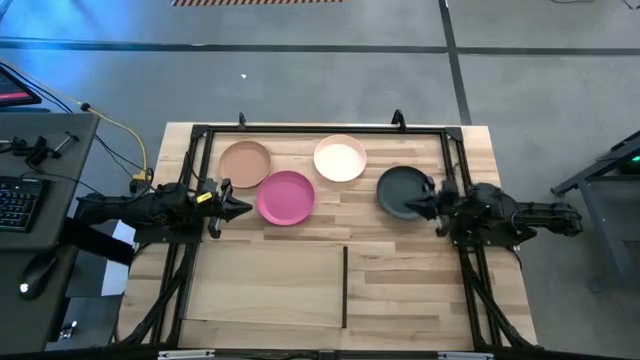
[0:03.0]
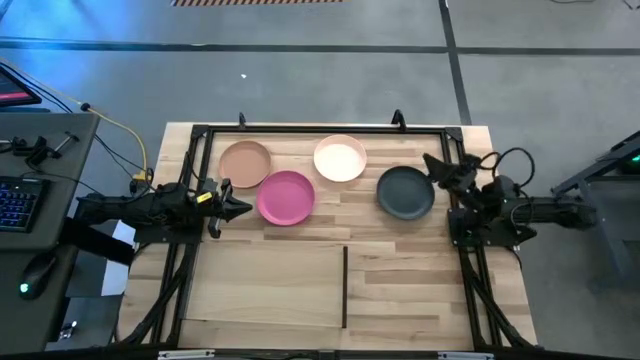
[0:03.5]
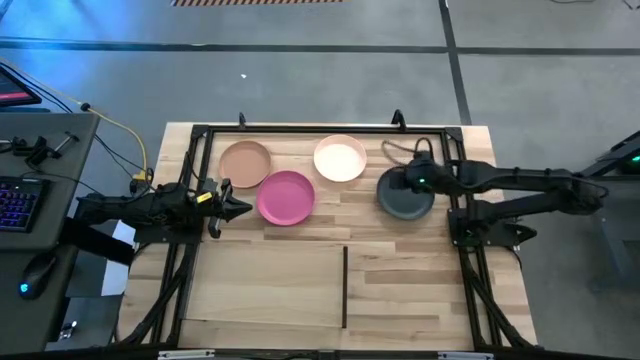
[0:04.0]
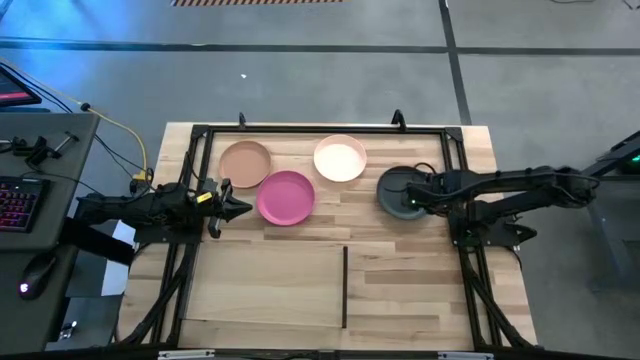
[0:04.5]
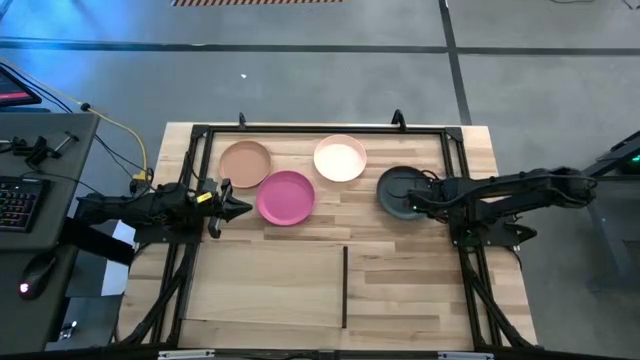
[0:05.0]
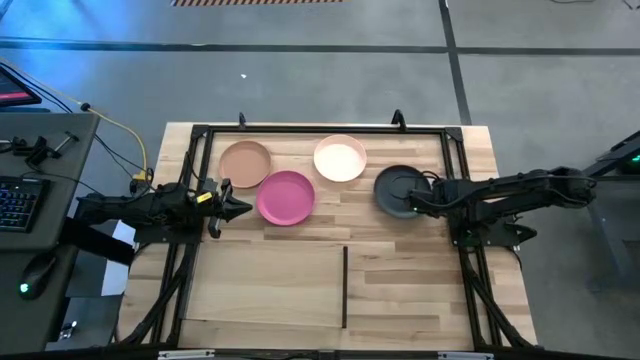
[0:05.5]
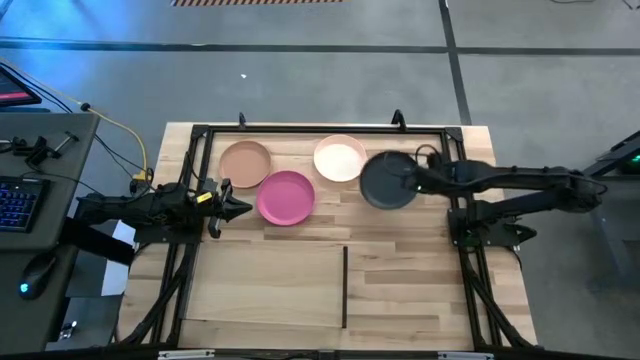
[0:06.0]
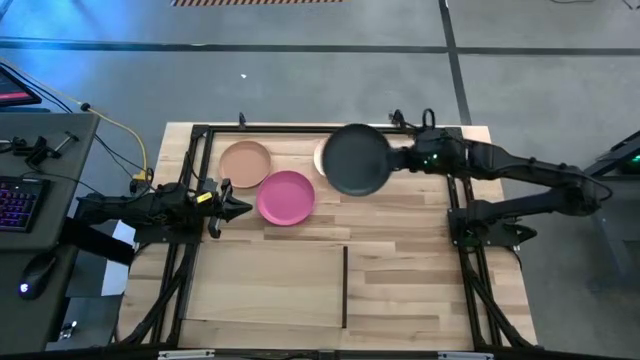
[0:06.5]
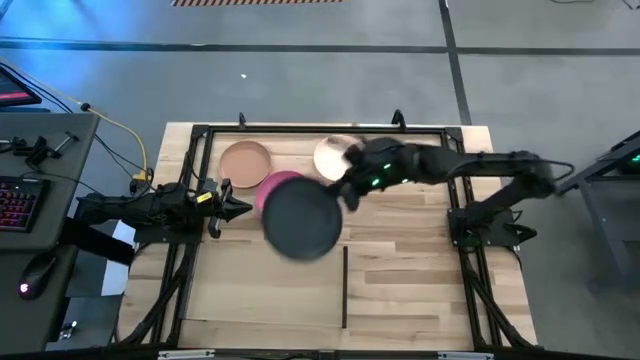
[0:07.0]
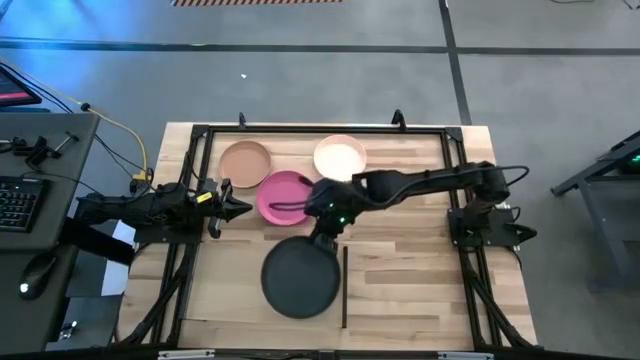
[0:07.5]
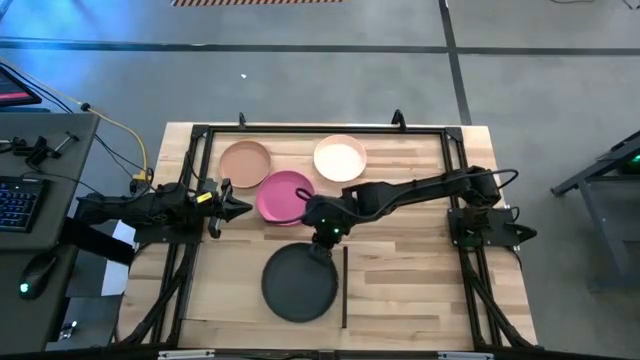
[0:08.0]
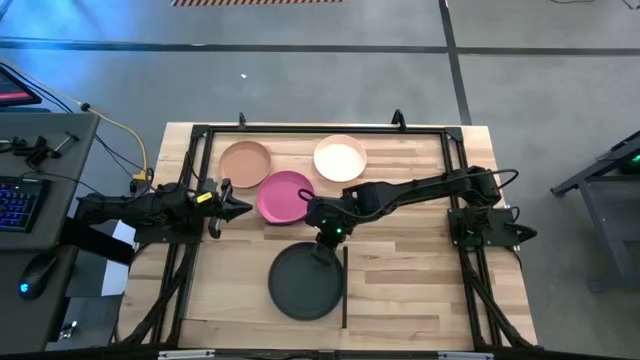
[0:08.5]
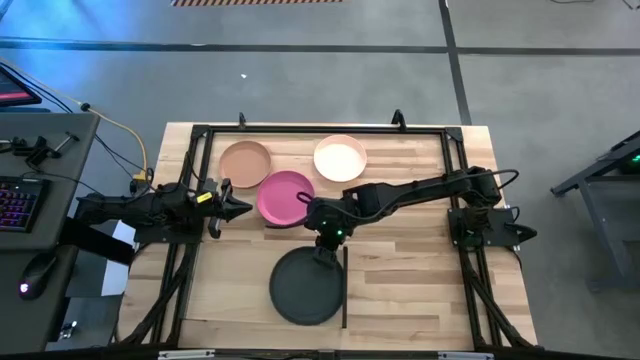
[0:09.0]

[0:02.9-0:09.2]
Task: Place and stack plates onto a shelf
Put the black plate on the shelf

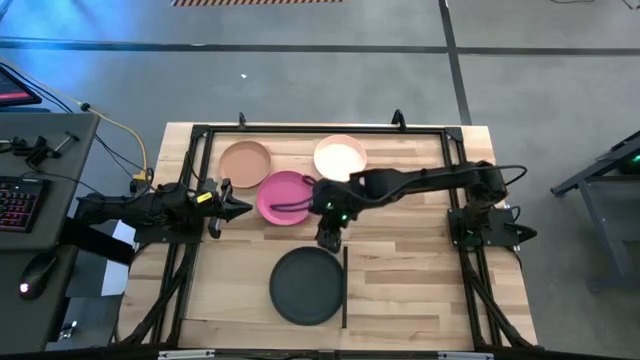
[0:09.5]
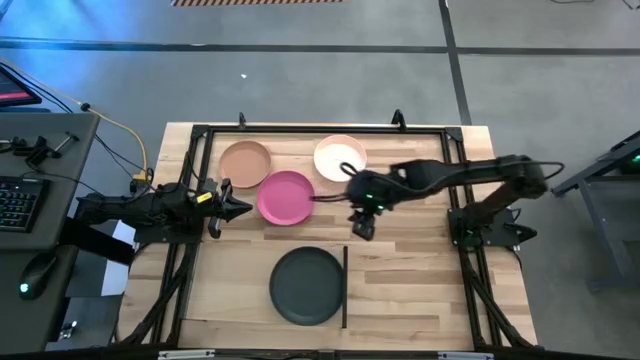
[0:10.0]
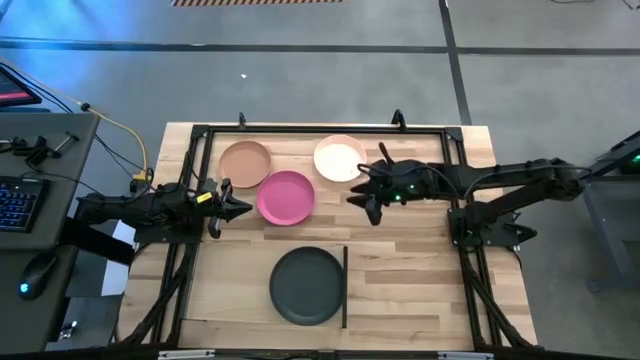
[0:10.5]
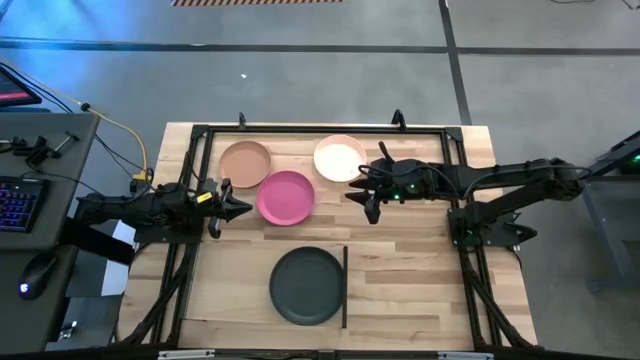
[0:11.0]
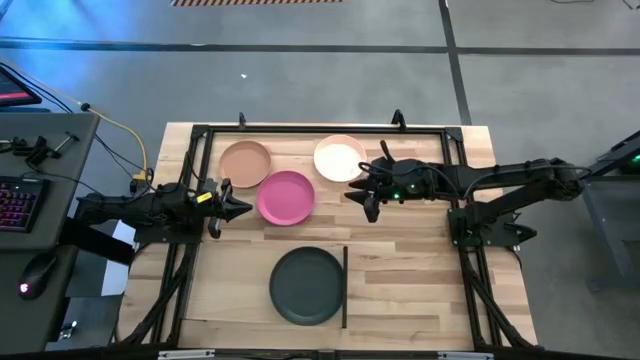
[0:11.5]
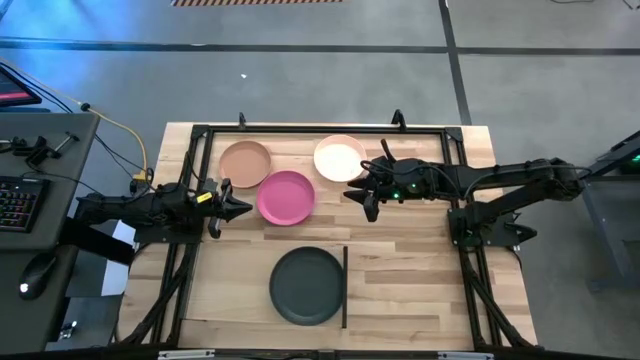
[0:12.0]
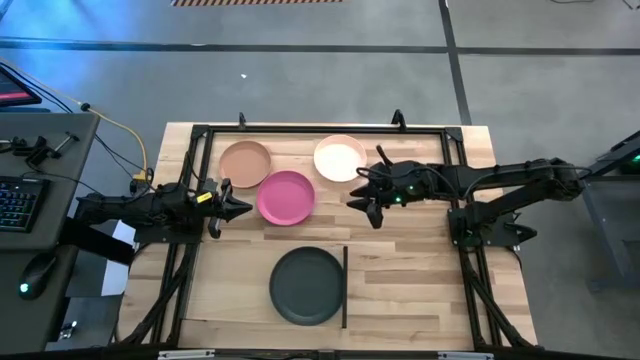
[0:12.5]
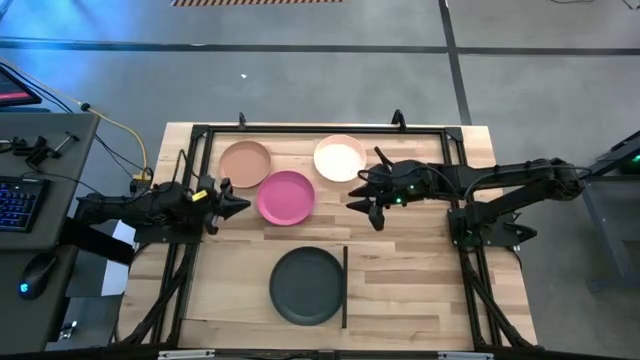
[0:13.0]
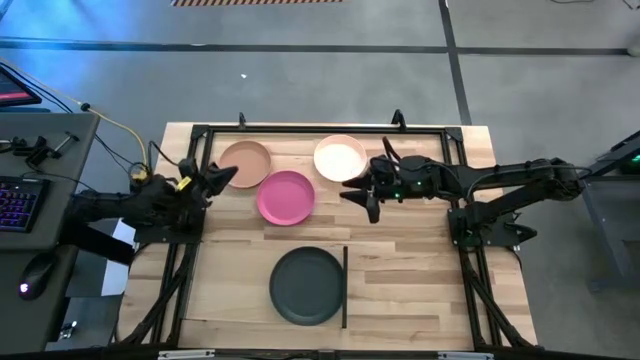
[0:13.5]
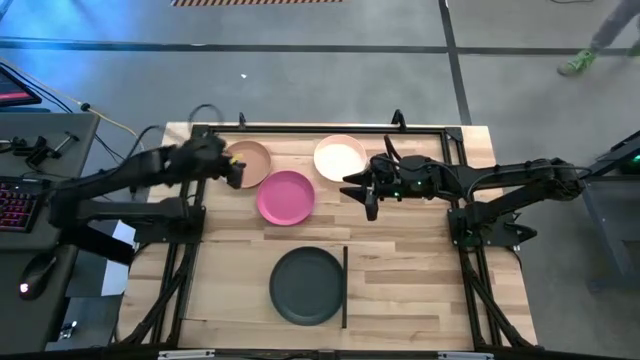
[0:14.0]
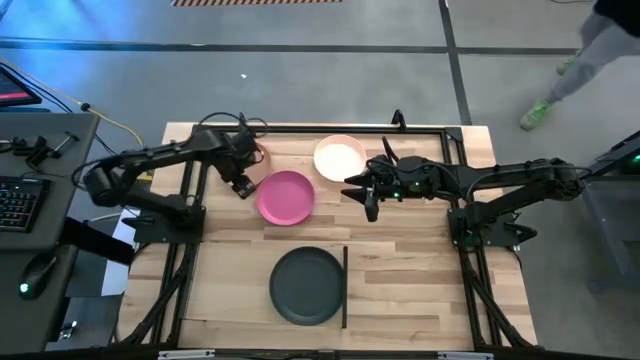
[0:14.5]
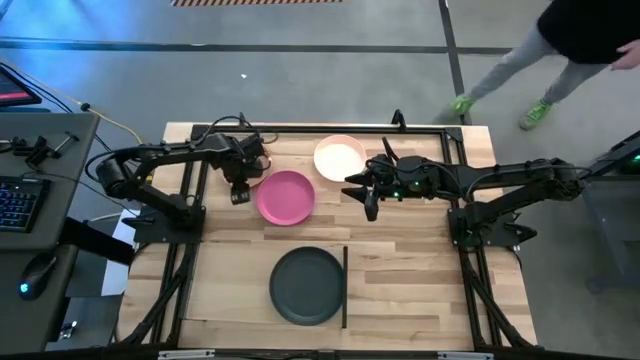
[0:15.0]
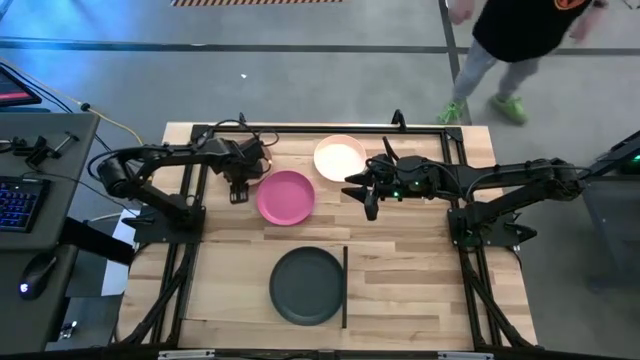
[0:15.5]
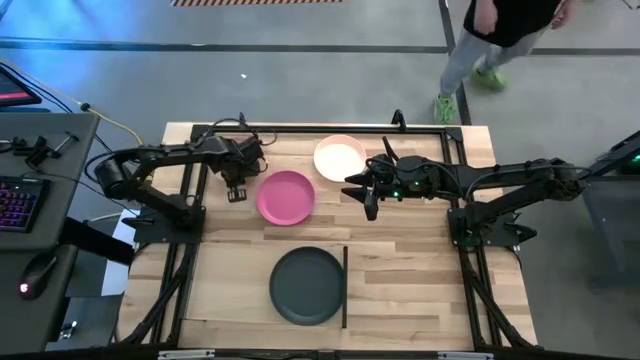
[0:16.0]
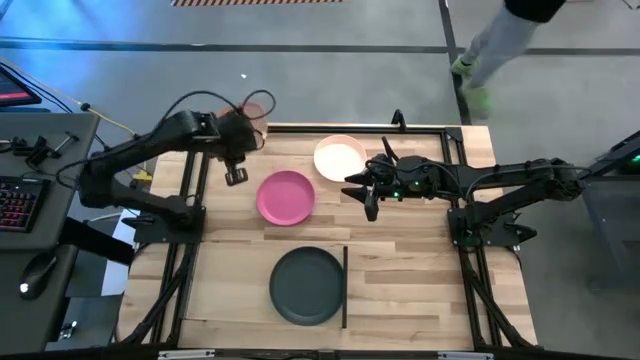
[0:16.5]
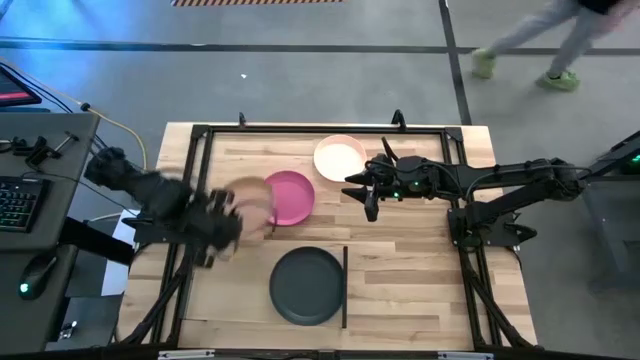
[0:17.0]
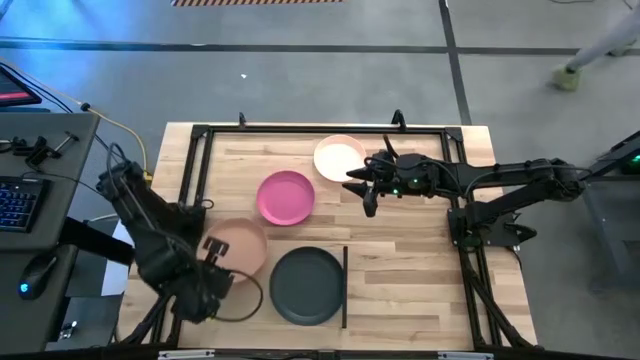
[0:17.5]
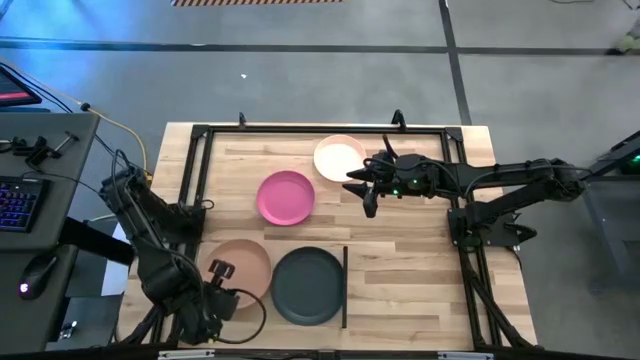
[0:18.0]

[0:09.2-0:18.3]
Put the orange plate on the shelf

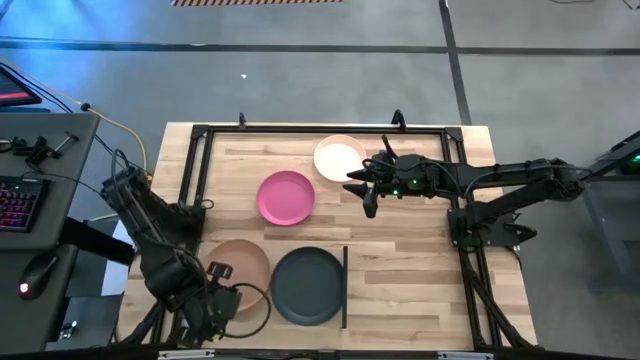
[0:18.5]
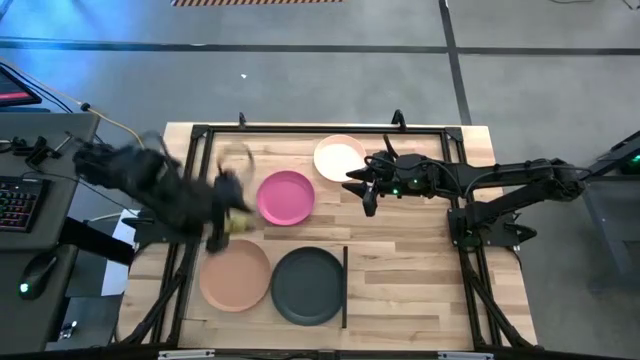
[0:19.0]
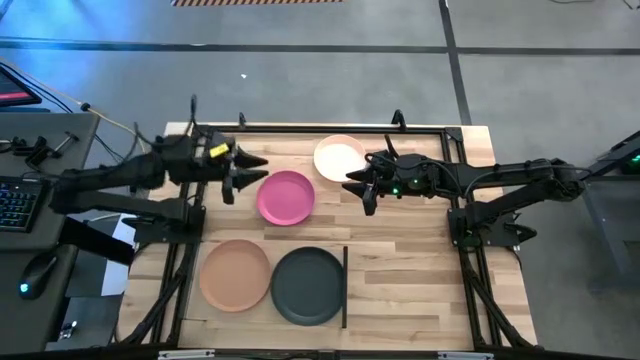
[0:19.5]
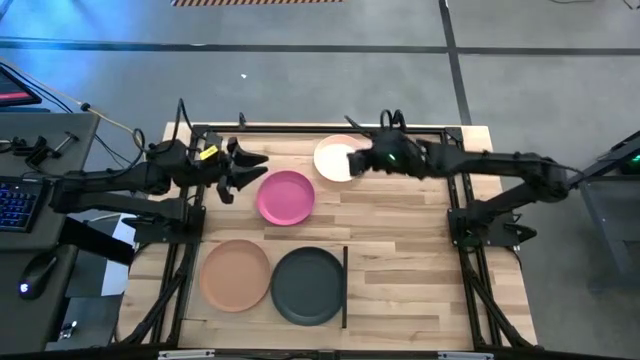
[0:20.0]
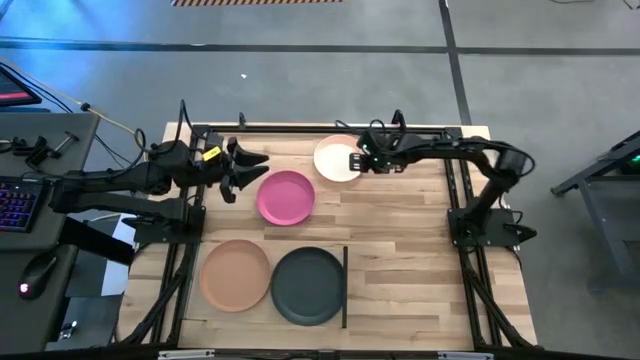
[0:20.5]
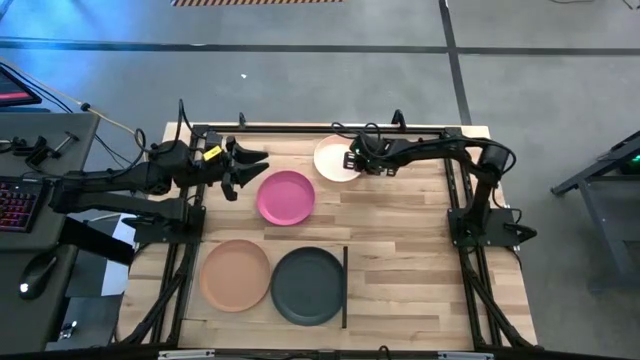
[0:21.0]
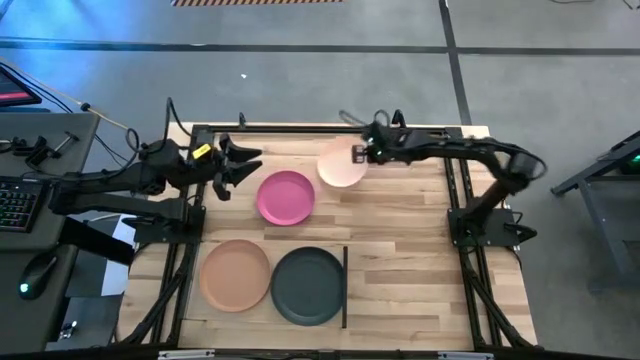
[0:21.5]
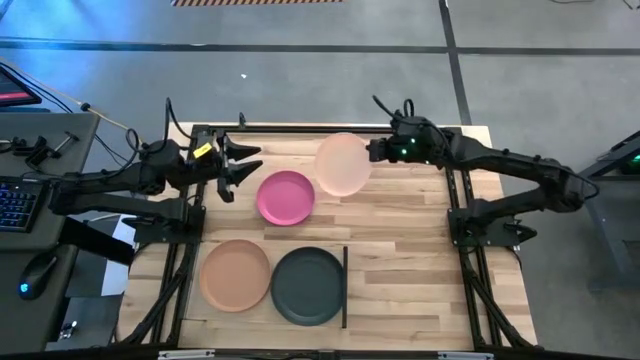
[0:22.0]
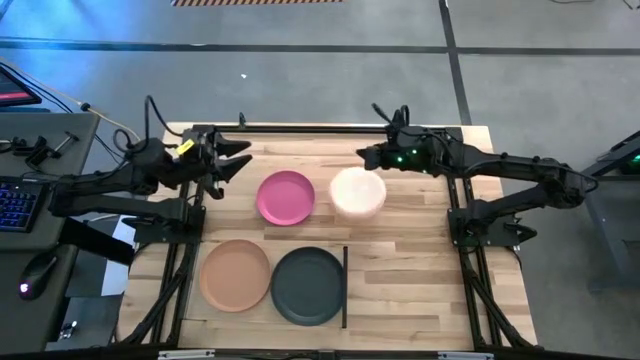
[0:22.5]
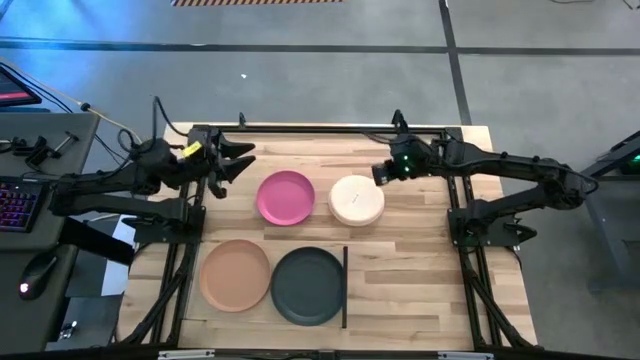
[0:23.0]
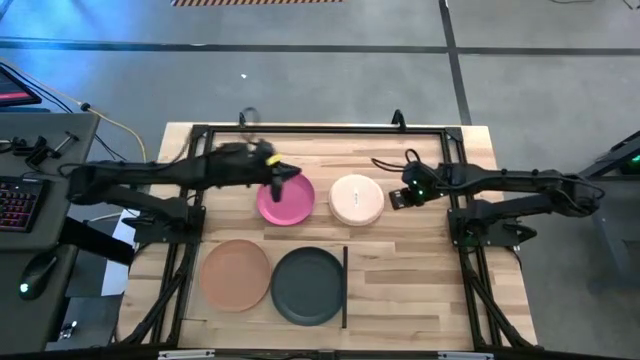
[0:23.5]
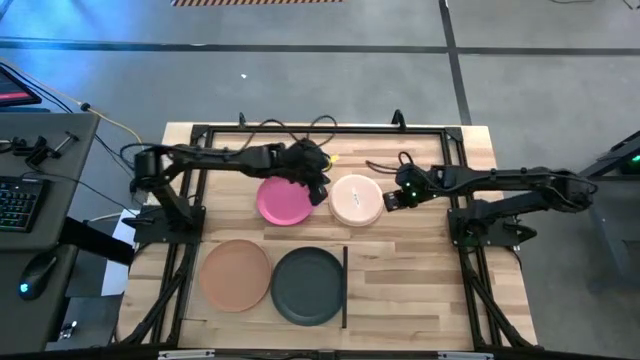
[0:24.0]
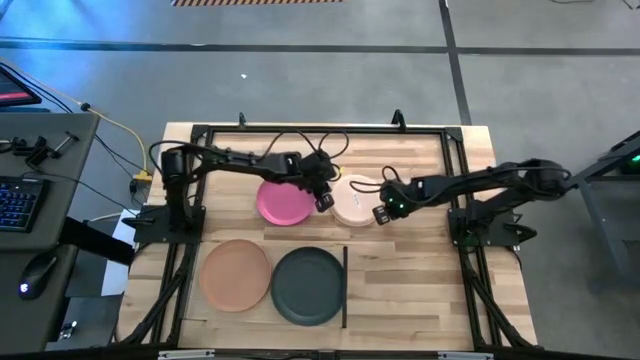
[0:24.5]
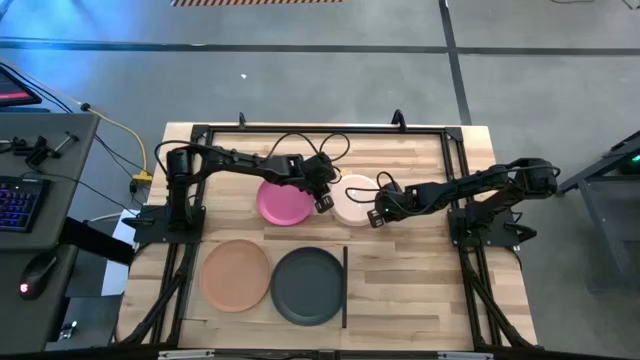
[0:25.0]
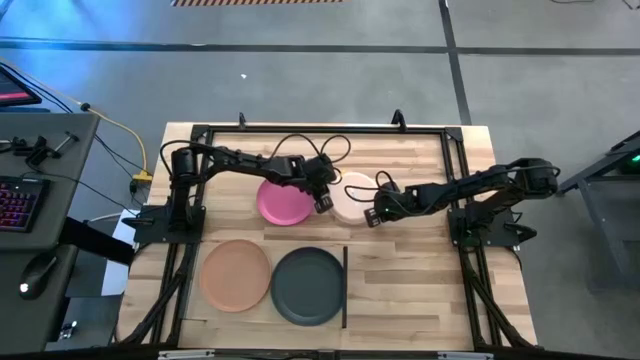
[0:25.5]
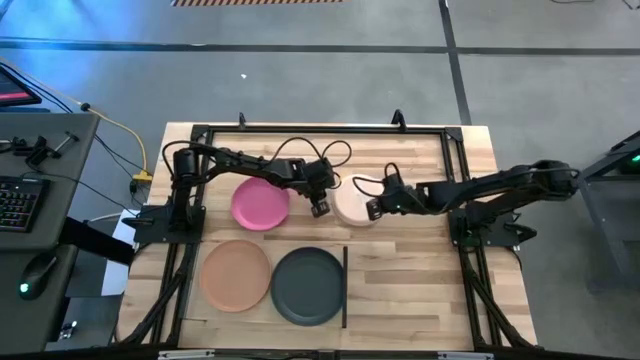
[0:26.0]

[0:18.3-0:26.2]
Stack the light orange plate on top of the orange plate on the shelf
